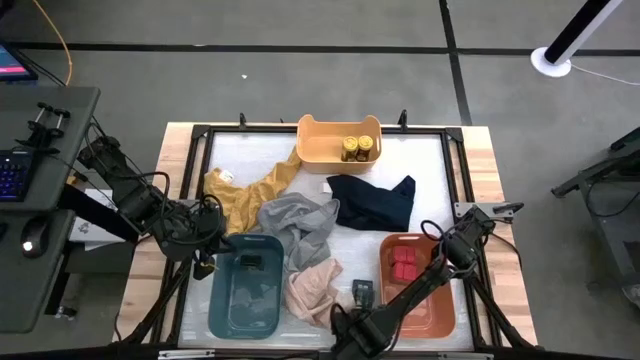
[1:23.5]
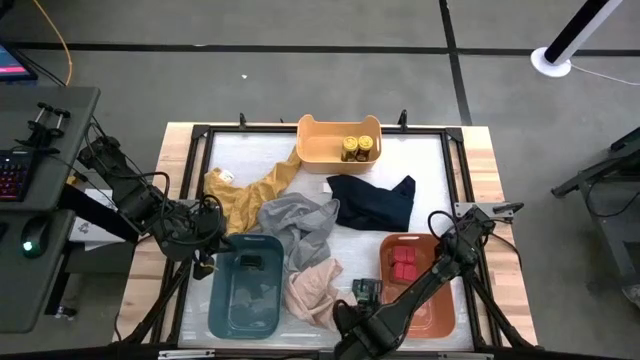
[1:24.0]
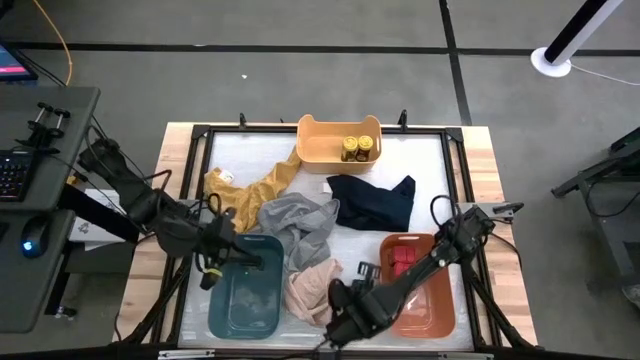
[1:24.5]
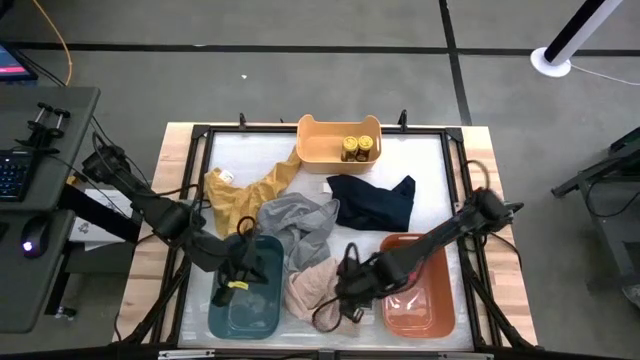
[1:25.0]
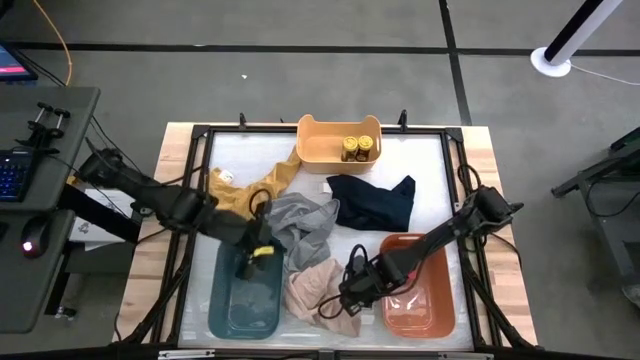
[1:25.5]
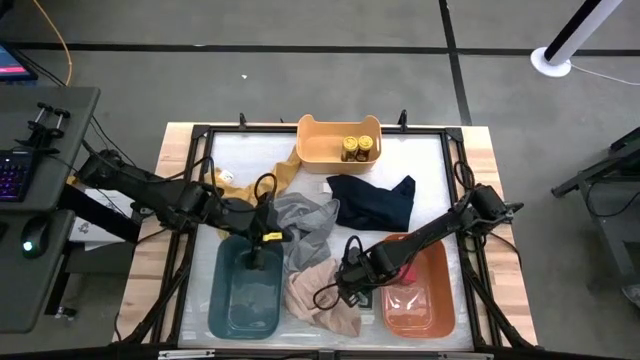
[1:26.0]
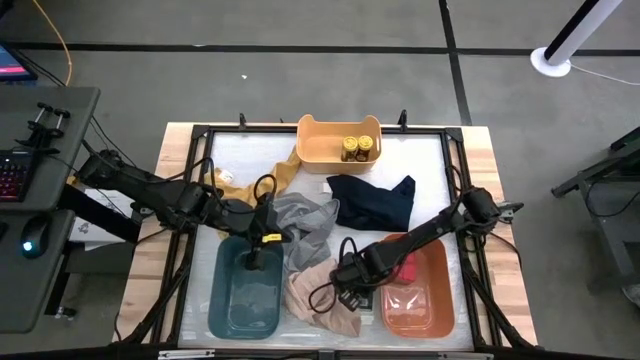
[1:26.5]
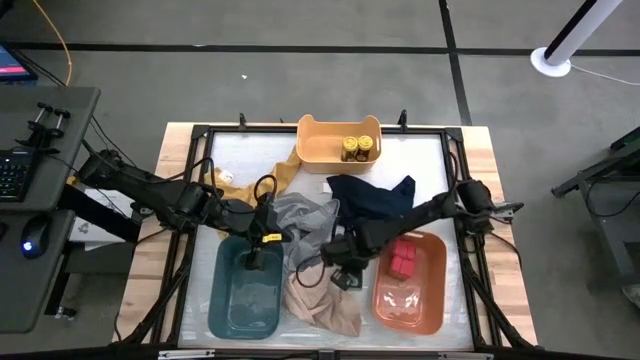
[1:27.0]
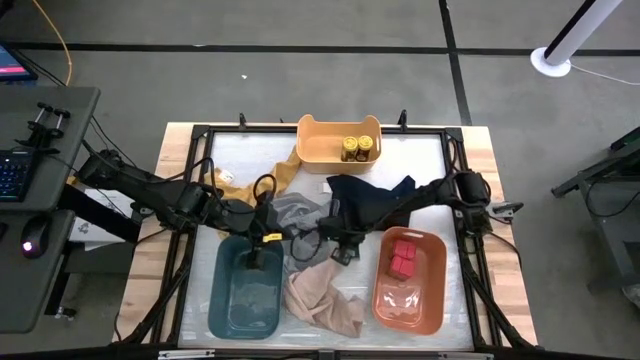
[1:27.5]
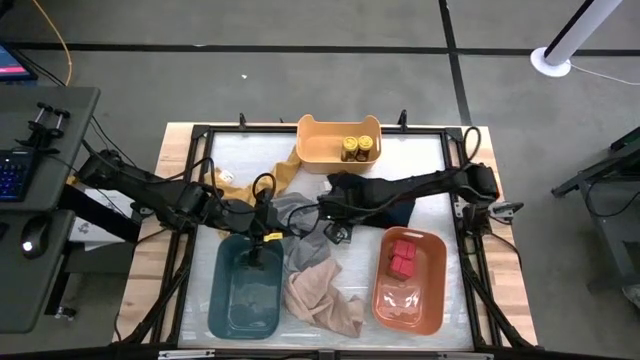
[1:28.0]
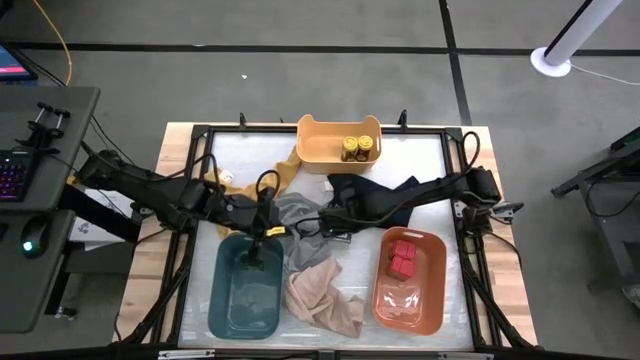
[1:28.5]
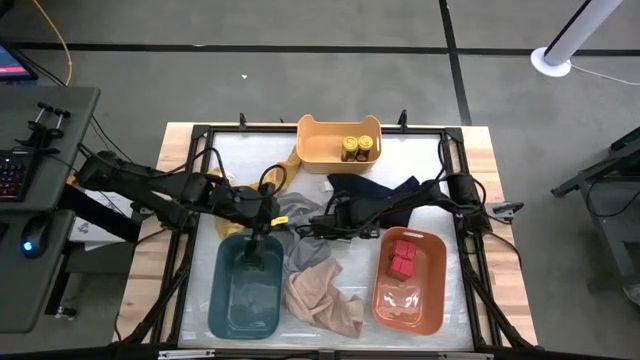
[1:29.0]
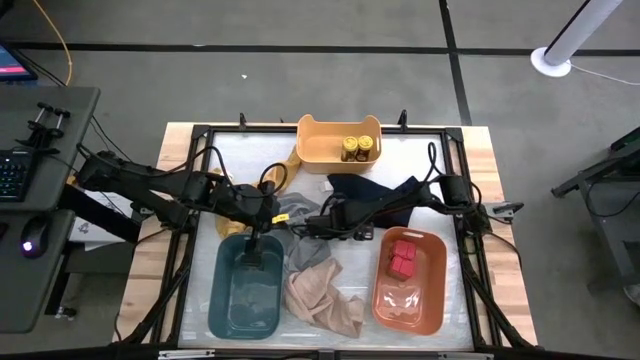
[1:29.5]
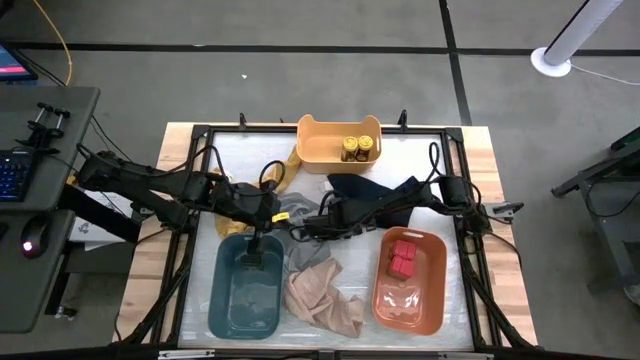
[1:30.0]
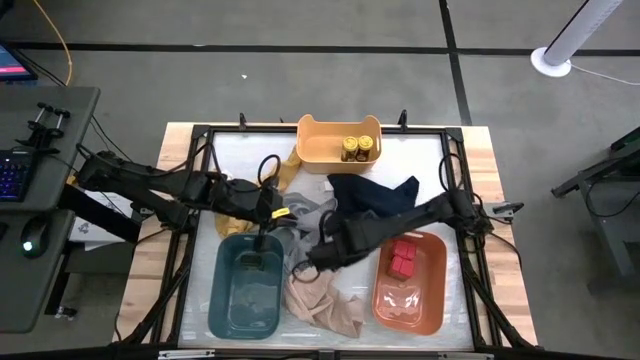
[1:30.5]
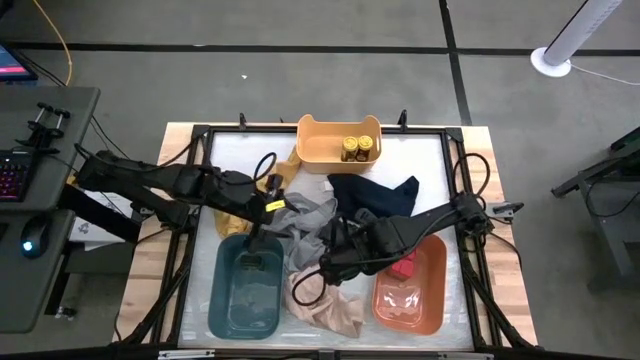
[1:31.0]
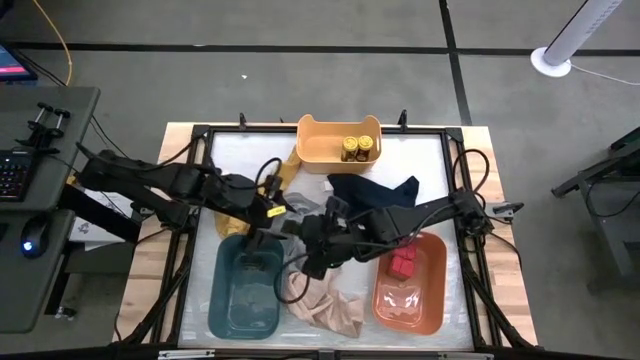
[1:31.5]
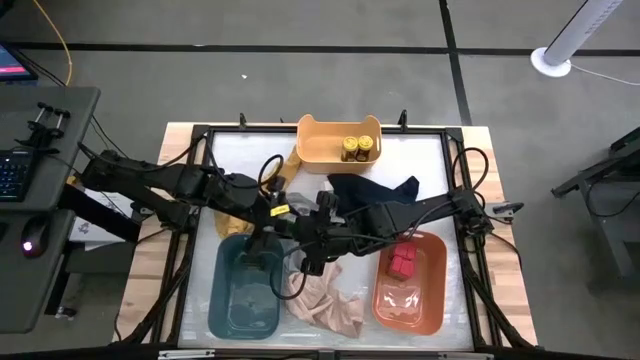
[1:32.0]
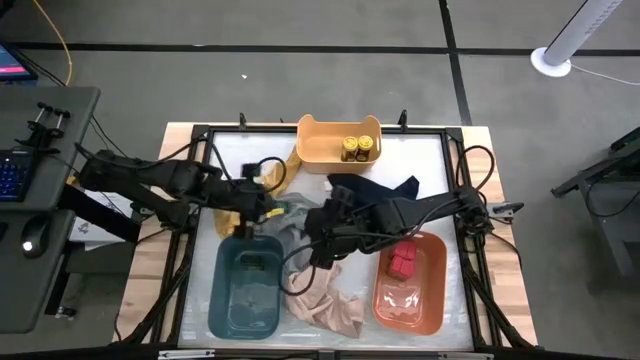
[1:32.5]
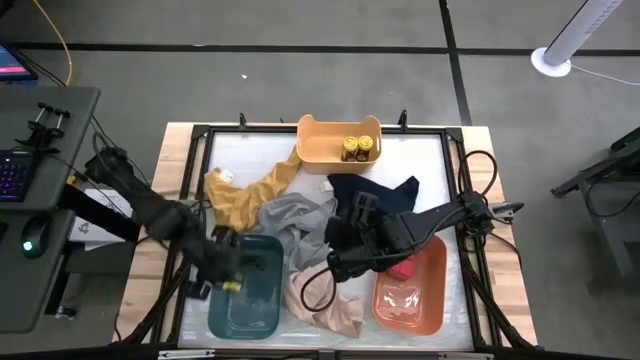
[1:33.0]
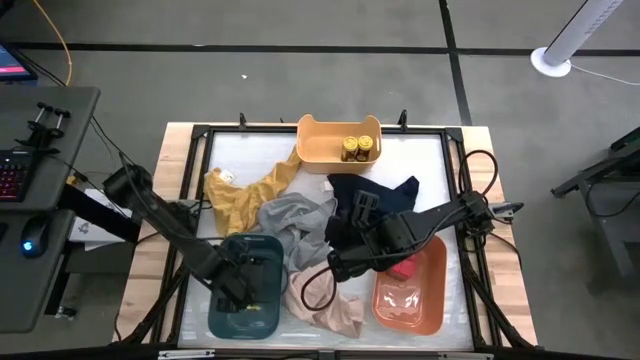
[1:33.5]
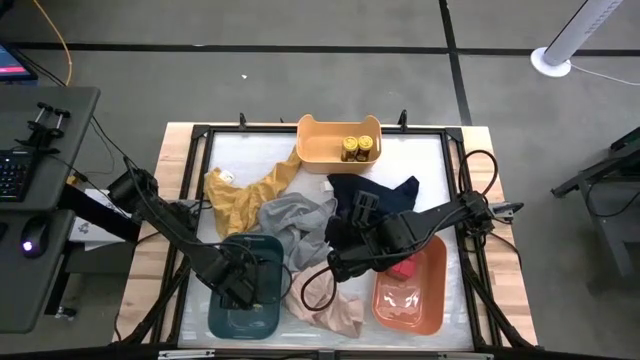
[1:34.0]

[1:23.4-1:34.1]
Task: Sort spices by type
Put the green seasoning can into the blue bin

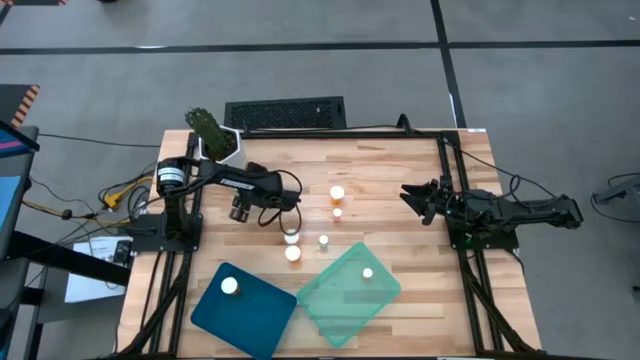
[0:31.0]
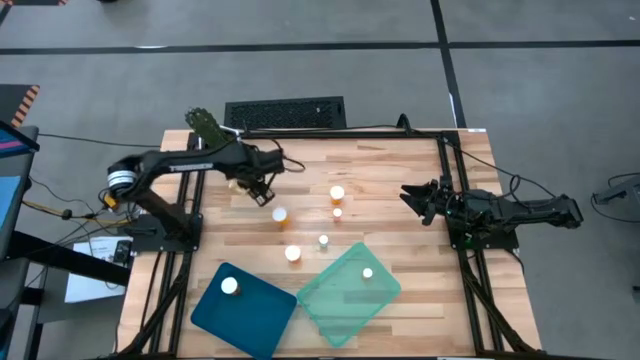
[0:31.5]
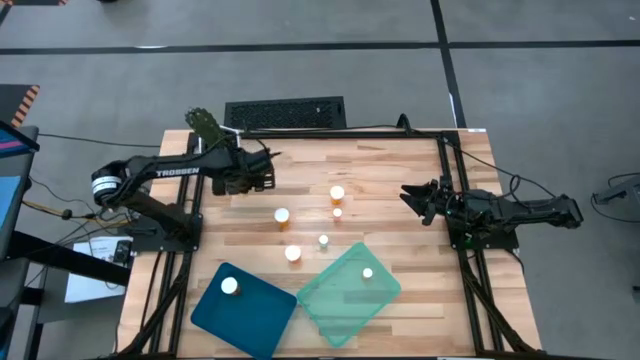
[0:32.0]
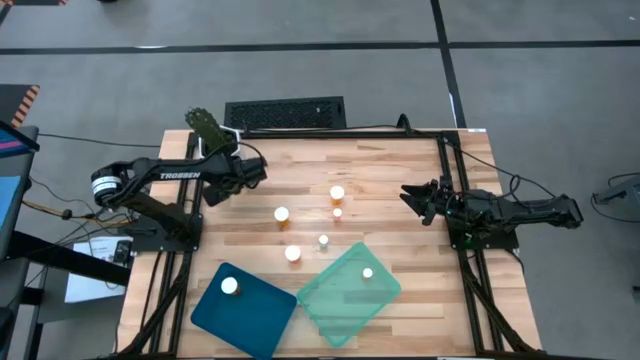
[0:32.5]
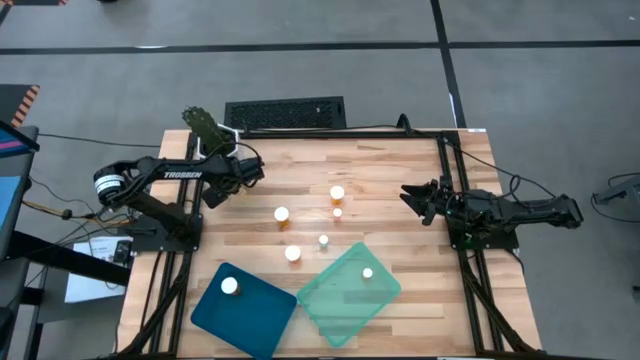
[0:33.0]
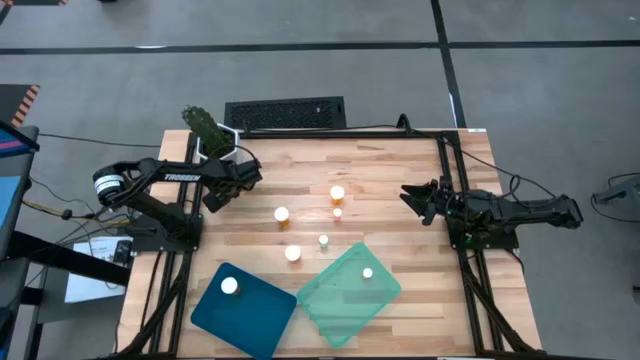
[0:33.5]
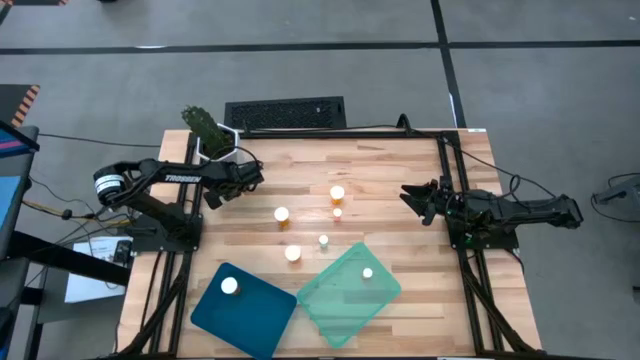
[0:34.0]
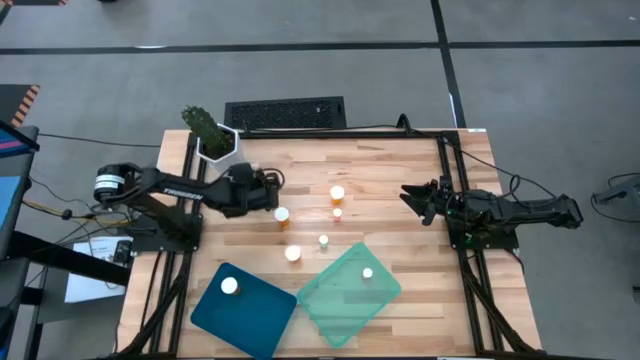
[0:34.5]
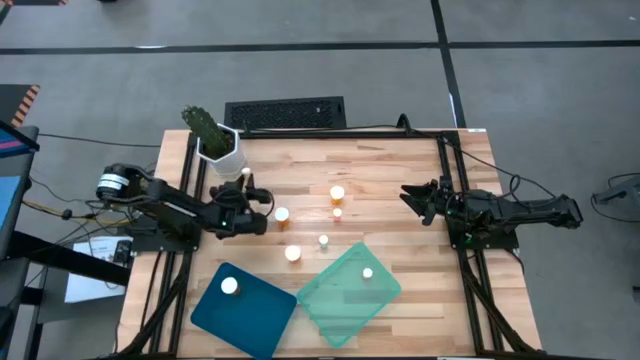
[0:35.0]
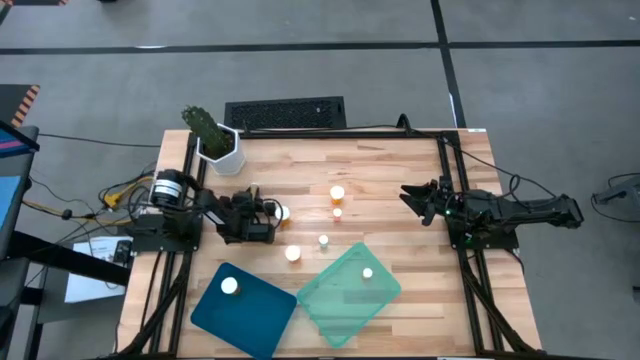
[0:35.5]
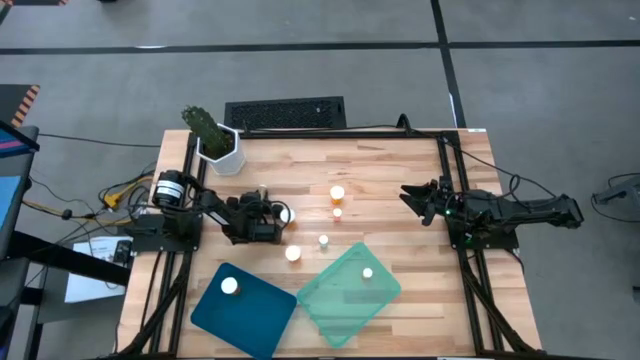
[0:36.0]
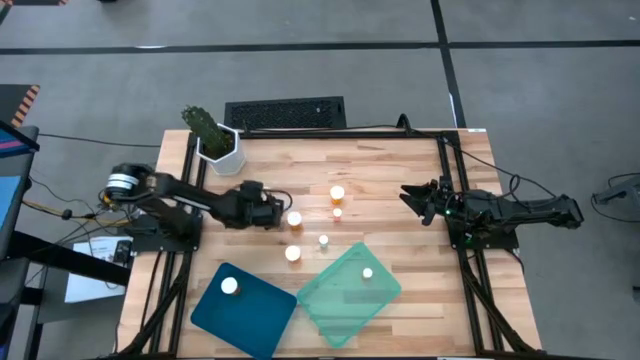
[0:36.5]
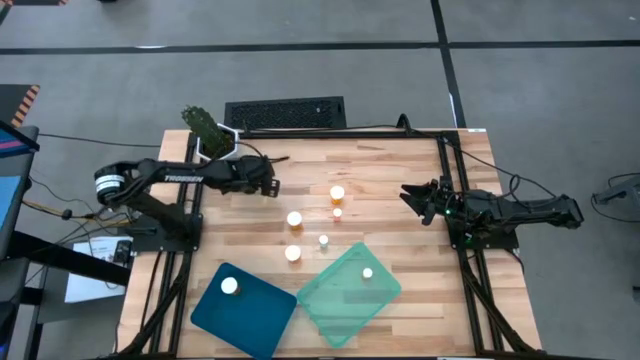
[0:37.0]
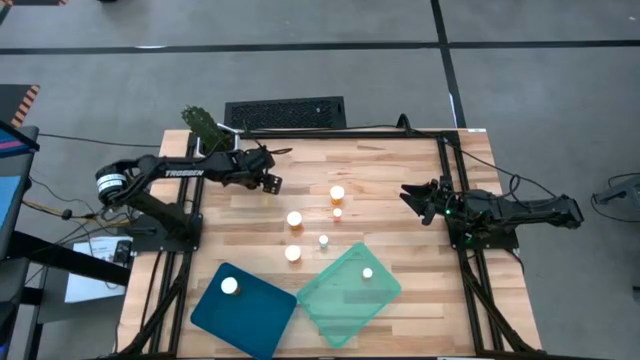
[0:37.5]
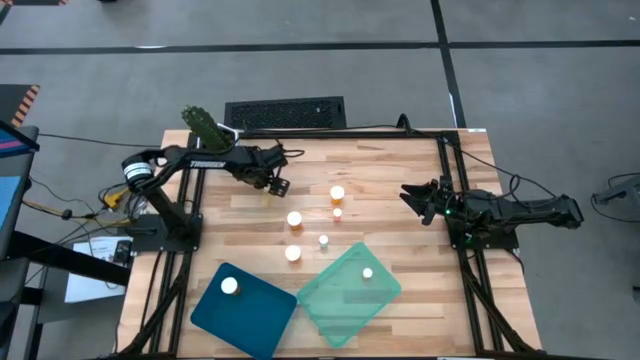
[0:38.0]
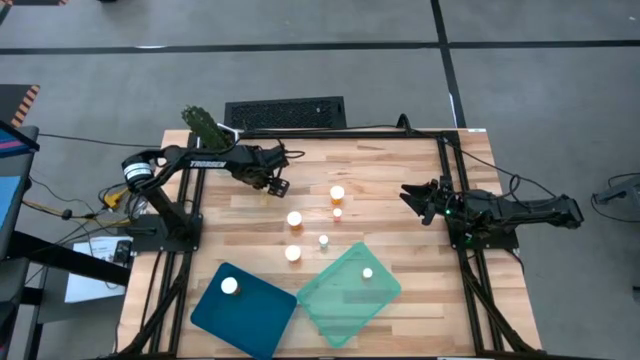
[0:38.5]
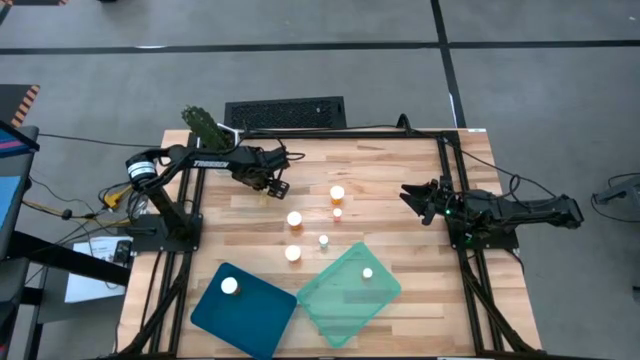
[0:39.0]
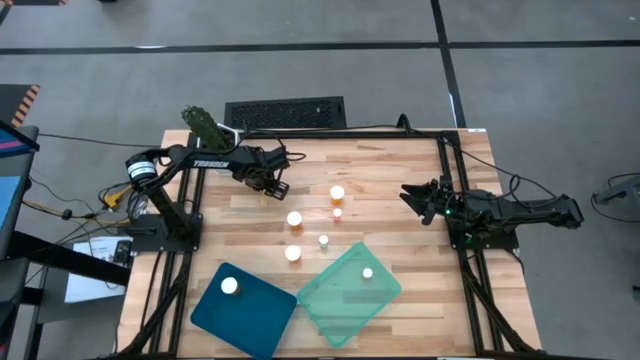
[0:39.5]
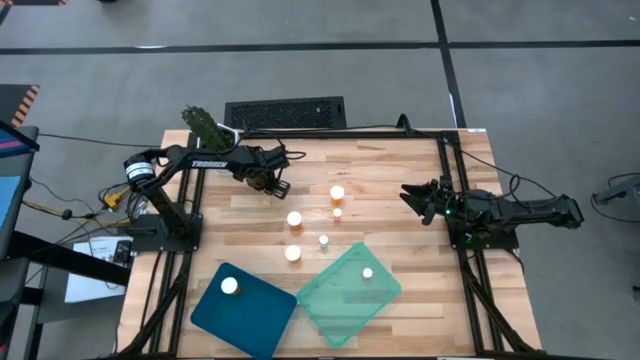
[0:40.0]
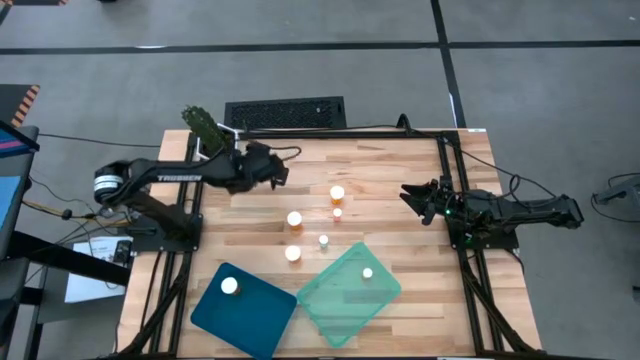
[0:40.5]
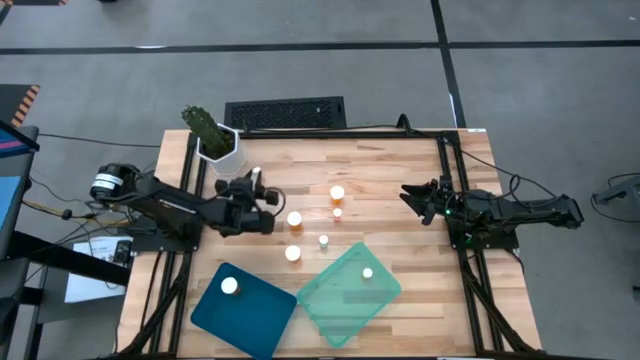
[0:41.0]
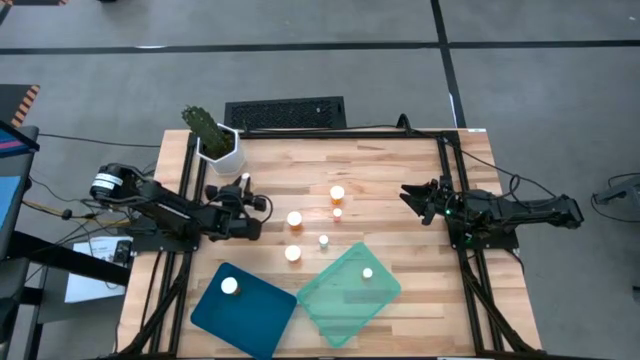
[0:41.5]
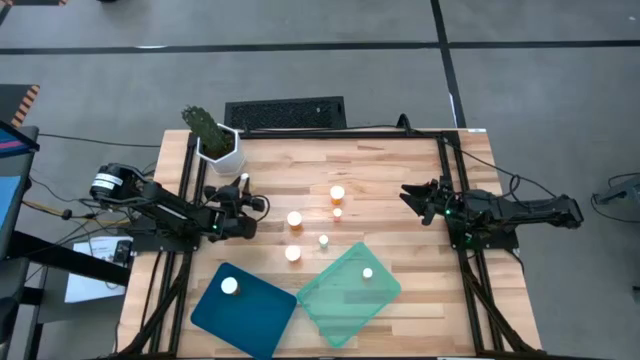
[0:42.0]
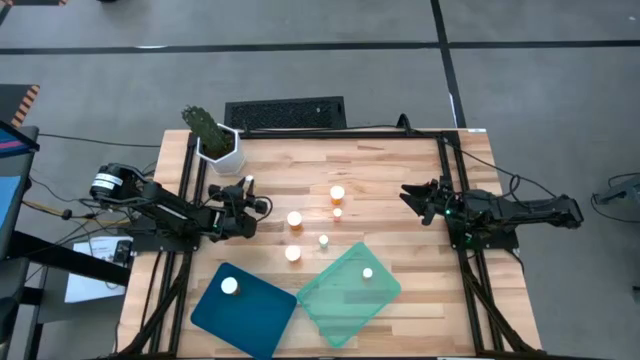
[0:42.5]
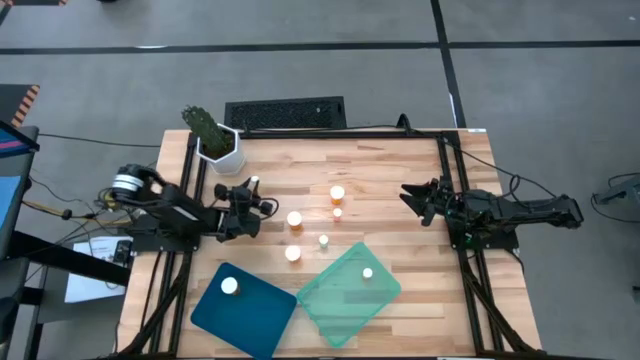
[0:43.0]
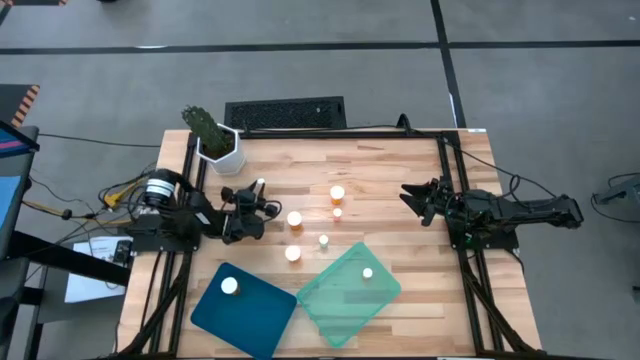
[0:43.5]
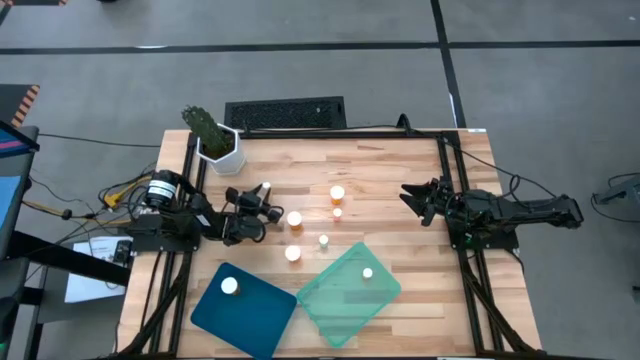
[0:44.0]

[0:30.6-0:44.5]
Task: Pick and place medicine bottles into bin by pill shape (circle, oval)
Put the small yellow pill bottle into the green bin
